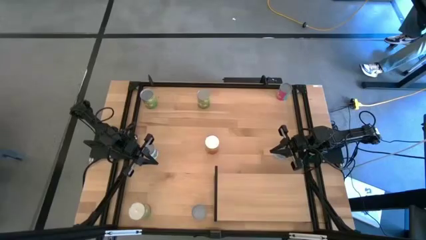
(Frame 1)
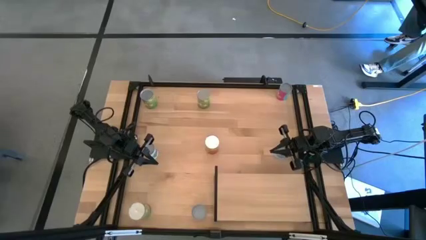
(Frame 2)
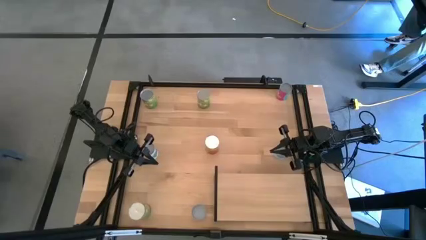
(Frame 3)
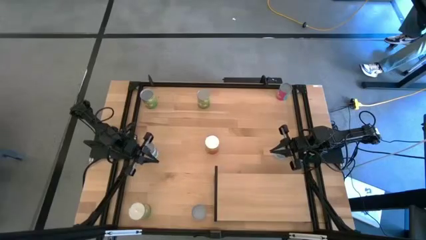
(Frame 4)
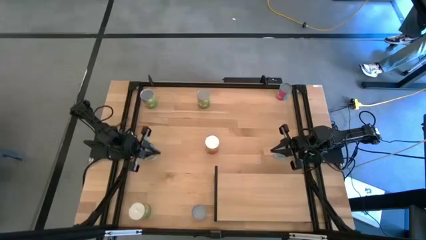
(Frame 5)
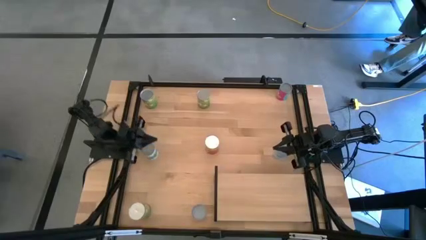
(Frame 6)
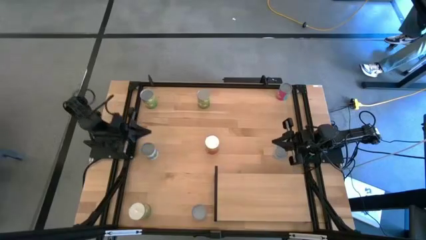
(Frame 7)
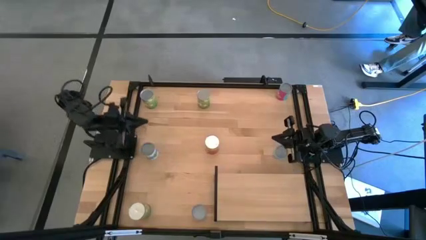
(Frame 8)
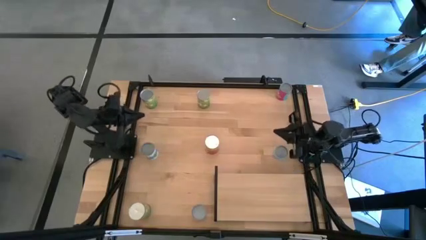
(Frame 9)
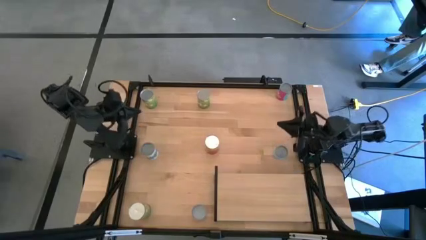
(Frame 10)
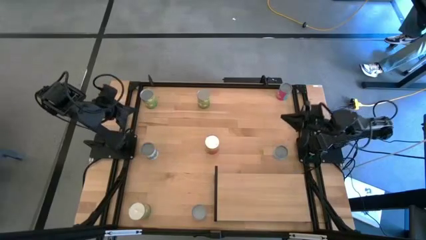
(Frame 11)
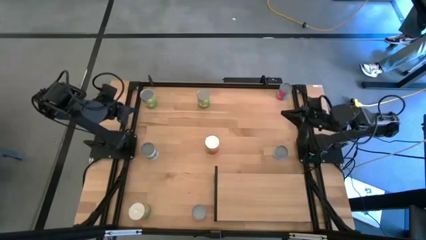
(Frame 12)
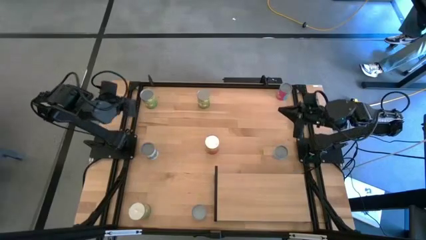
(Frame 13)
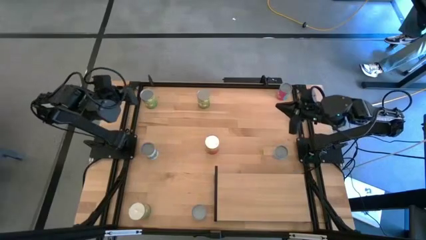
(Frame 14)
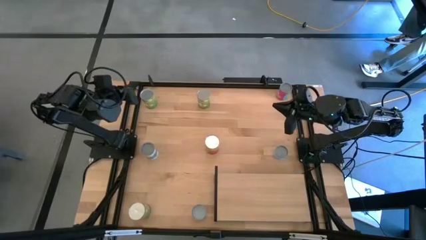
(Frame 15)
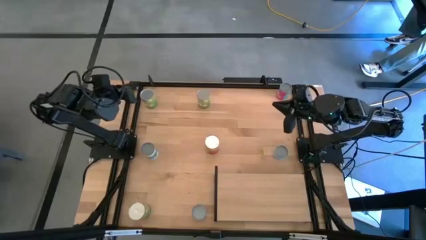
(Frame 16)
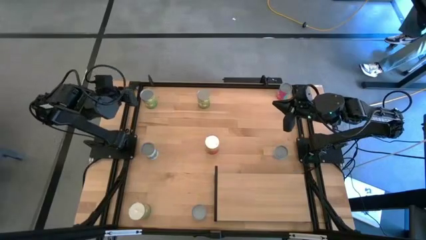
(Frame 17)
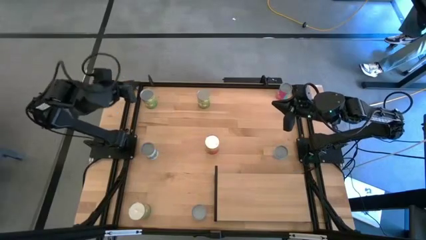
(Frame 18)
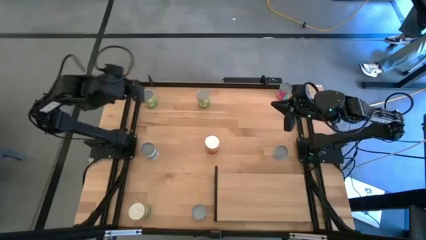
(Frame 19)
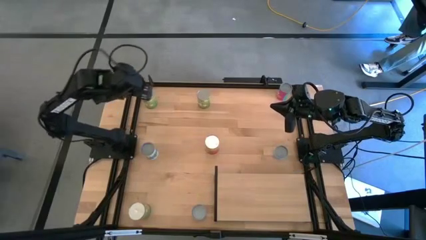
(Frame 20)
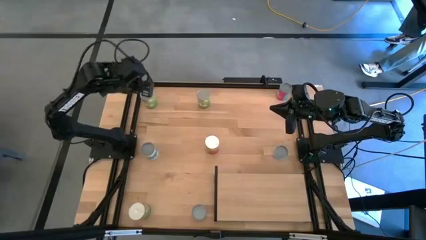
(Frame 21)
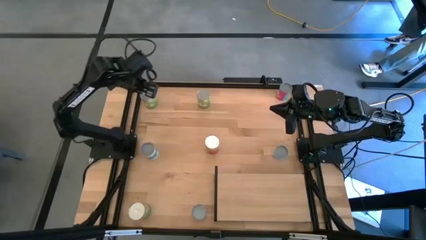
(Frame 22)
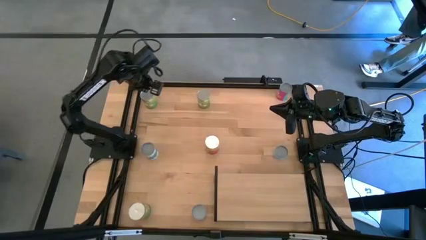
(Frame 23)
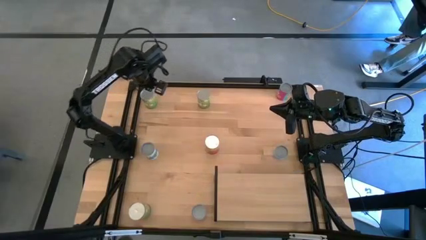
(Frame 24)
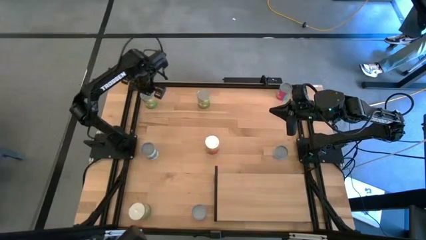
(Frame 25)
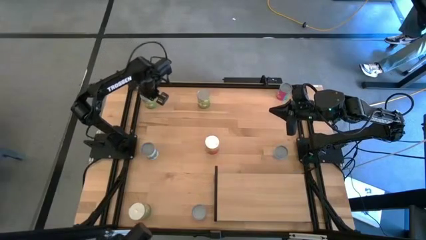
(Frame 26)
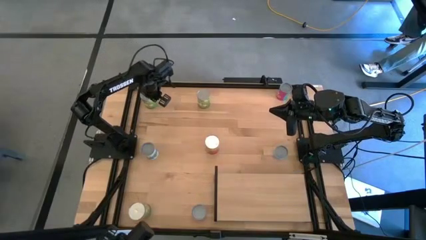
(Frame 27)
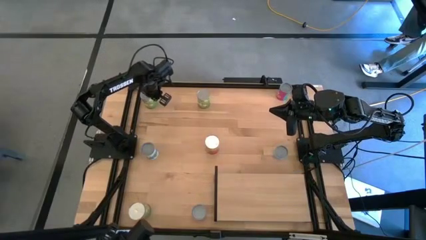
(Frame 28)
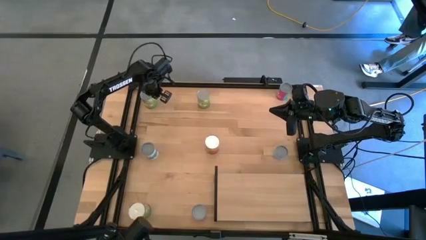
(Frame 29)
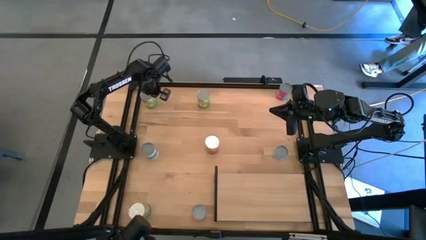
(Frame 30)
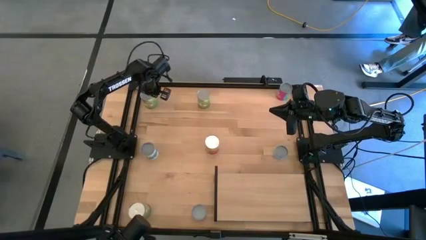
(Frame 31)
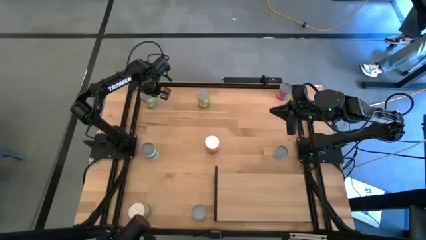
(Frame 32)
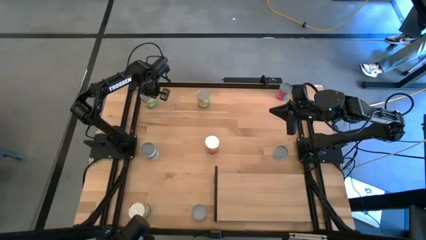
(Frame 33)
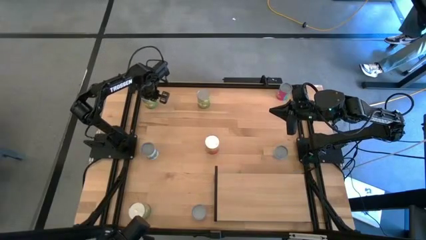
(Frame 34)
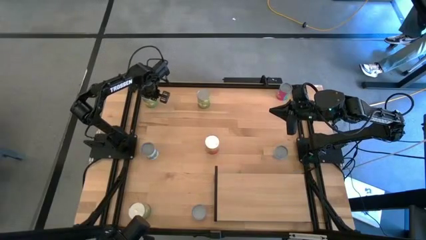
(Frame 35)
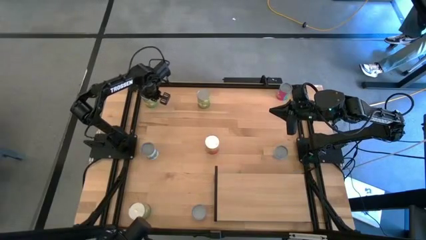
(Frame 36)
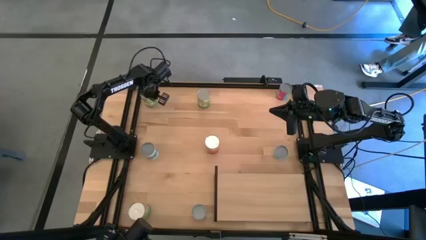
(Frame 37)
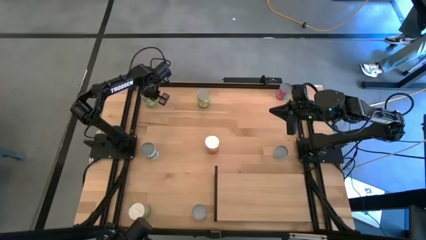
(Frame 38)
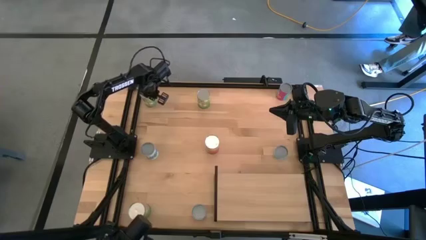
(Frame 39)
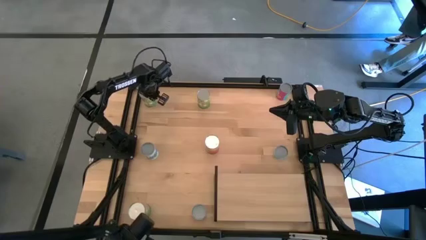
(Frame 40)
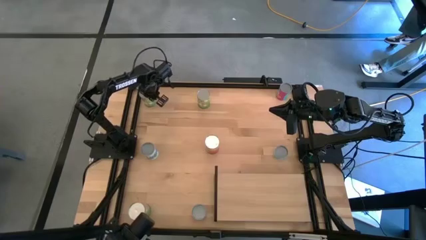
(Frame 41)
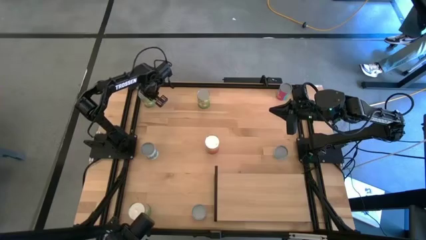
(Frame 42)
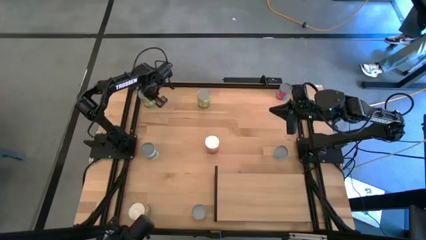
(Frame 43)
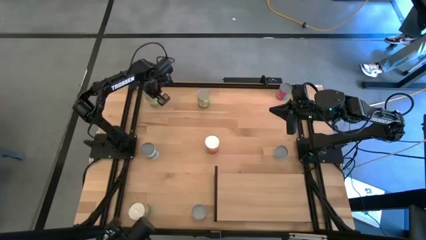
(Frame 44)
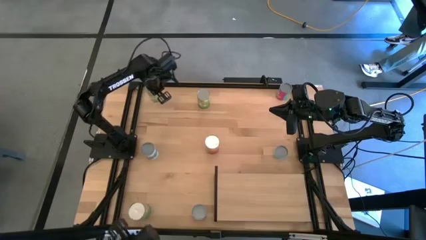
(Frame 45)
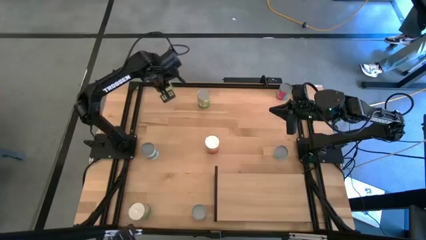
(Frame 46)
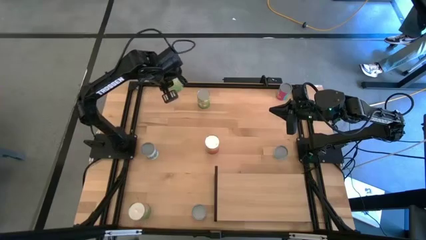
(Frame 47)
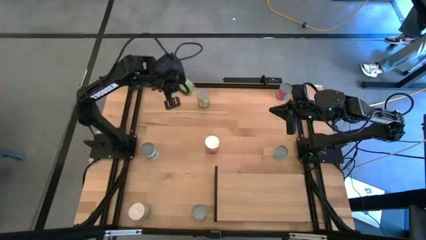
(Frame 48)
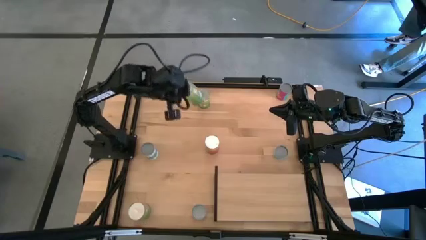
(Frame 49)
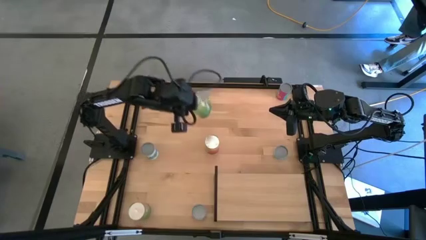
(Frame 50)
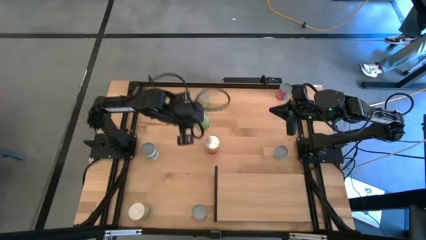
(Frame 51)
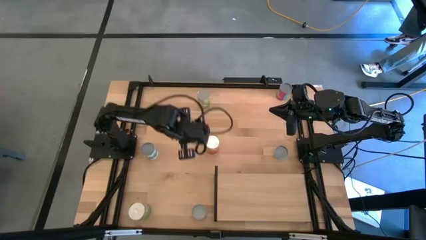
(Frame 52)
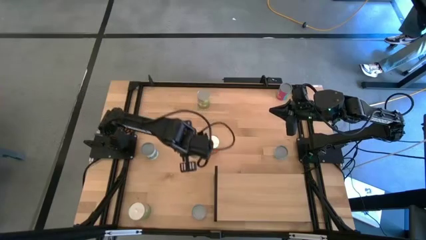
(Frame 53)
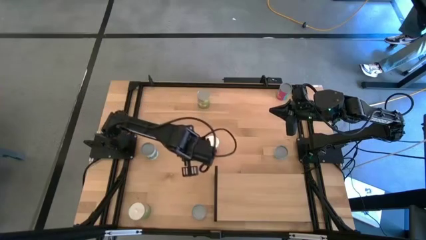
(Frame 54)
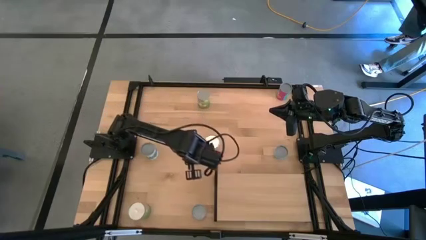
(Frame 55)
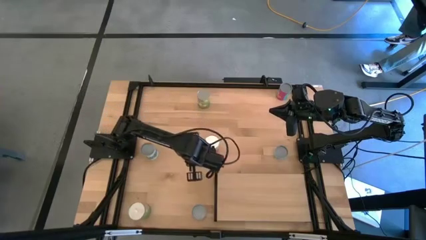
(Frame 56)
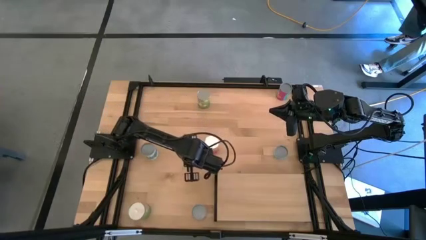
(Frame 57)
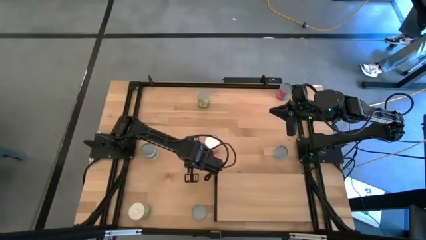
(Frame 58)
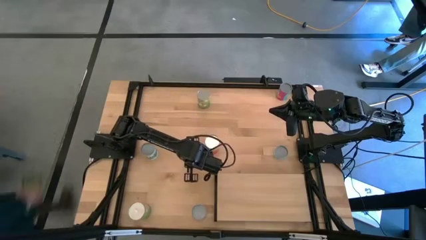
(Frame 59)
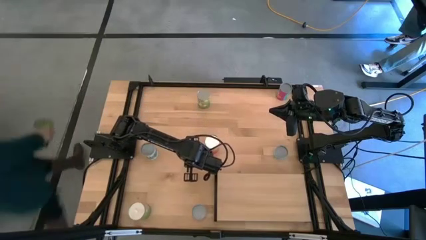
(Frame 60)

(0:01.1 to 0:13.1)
Task: Pick and place cans onto a shelf
Put the left canned pears on the shelf
